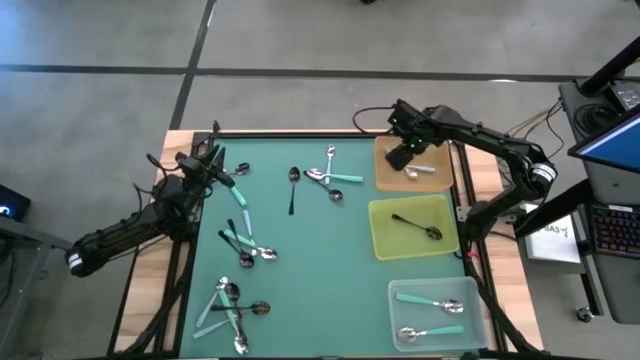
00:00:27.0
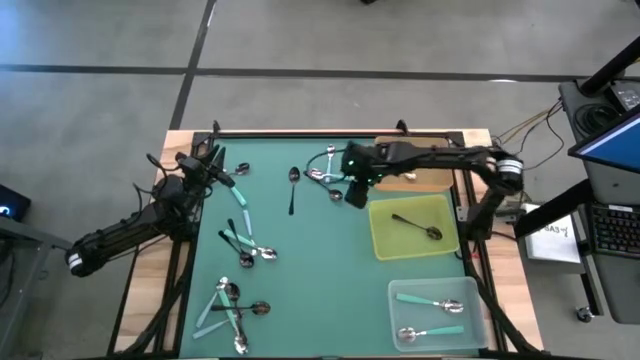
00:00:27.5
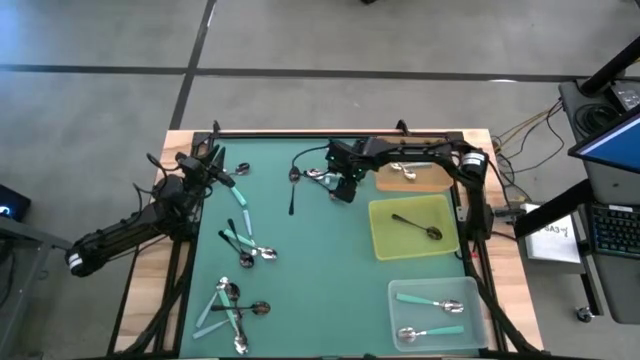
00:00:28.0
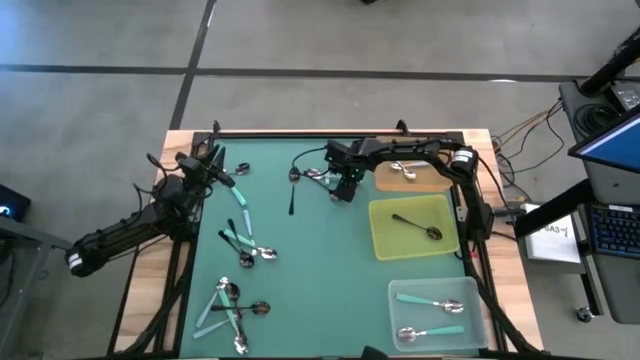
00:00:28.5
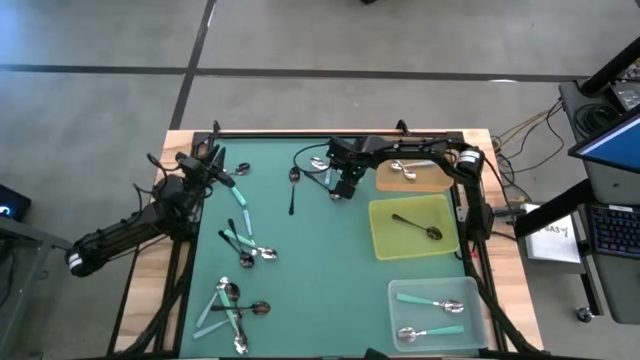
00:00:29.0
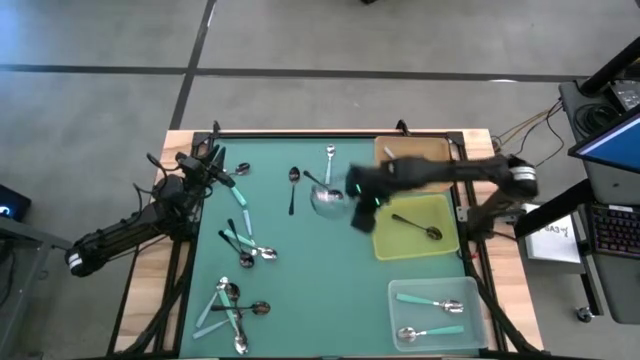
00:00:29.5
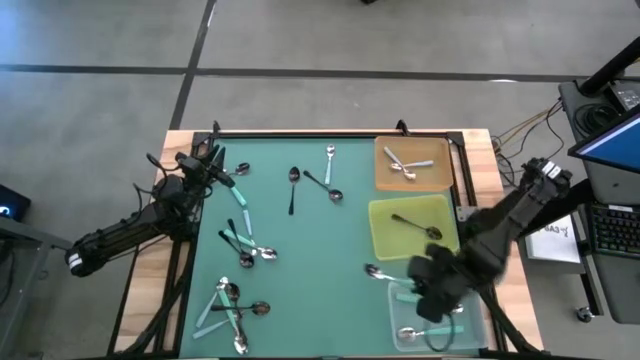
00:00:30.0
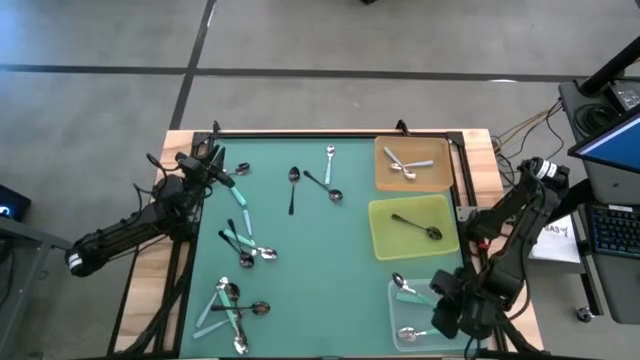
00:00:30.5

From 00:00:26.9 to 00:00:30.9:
Task: Sort silverware by color (type)
Put the green spoon into the transparent bin

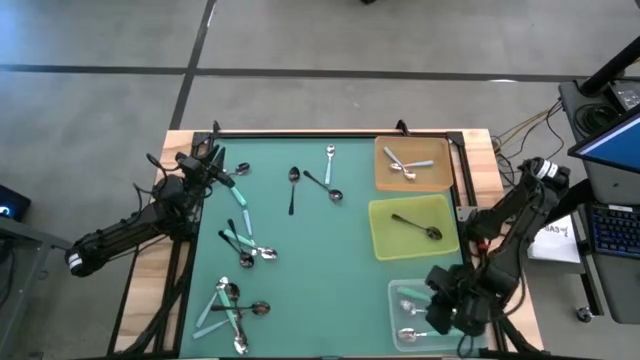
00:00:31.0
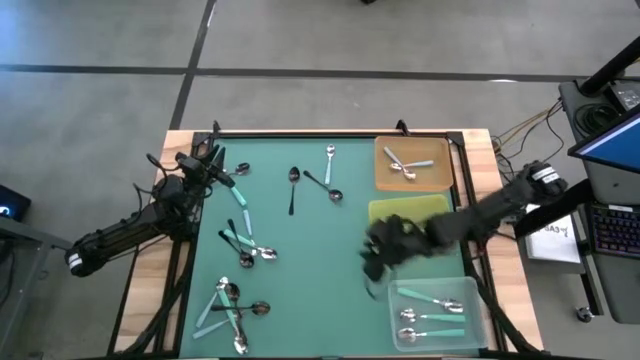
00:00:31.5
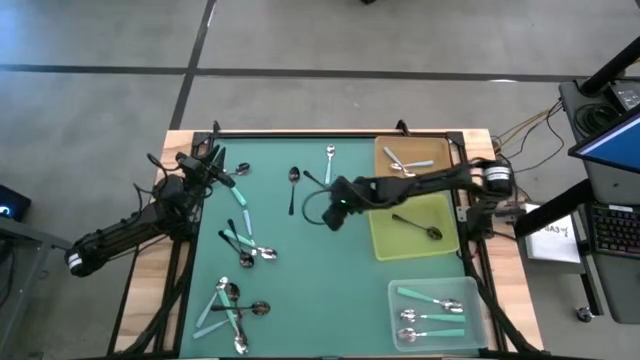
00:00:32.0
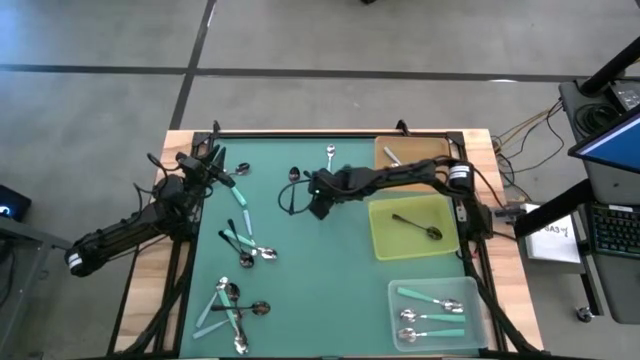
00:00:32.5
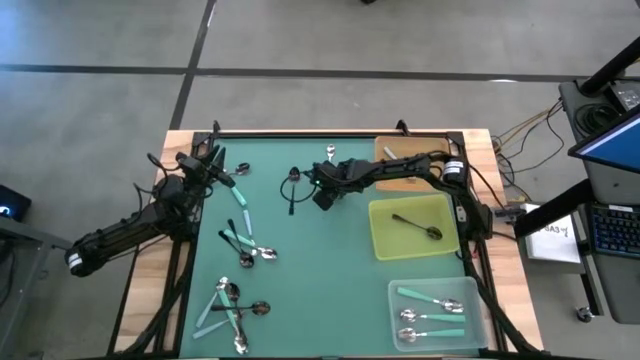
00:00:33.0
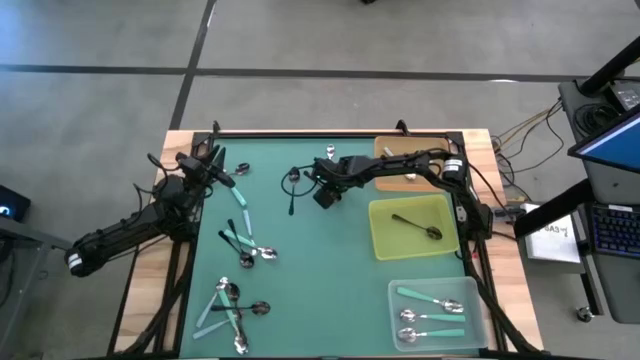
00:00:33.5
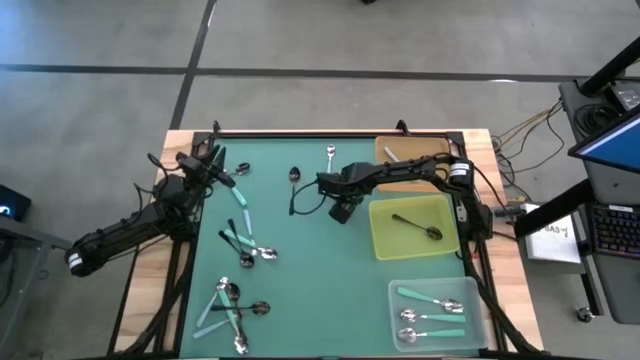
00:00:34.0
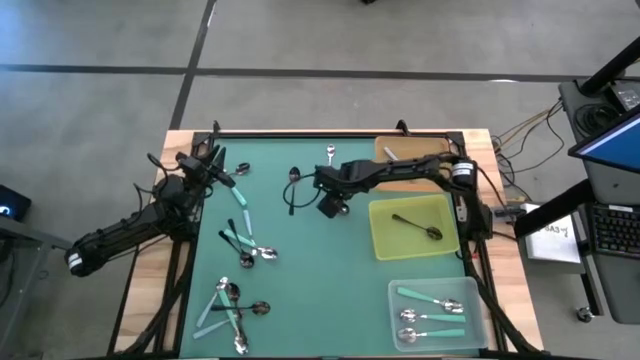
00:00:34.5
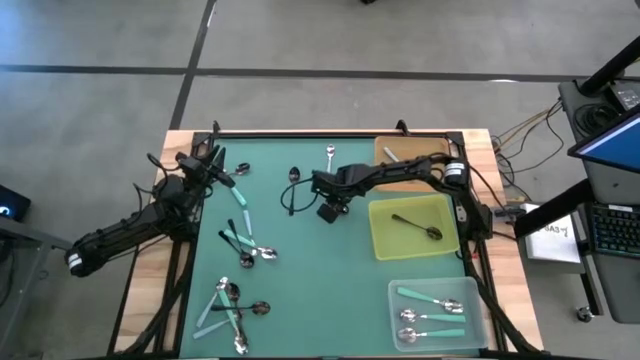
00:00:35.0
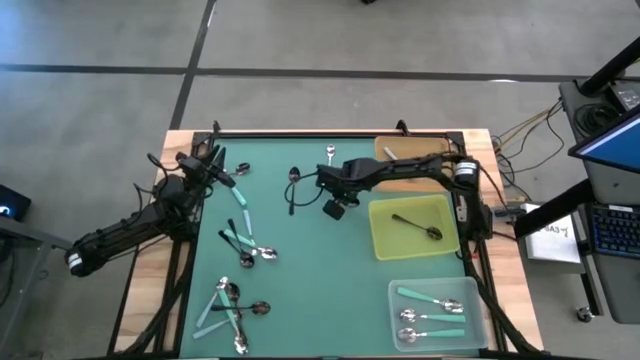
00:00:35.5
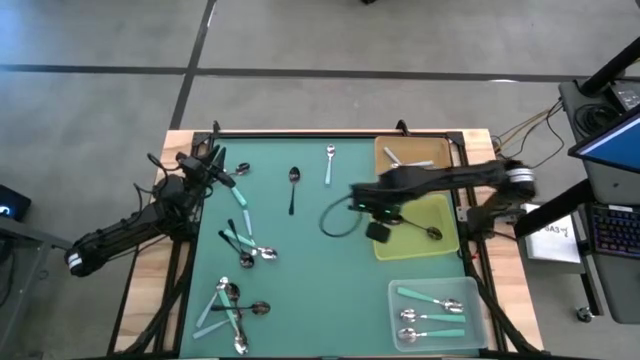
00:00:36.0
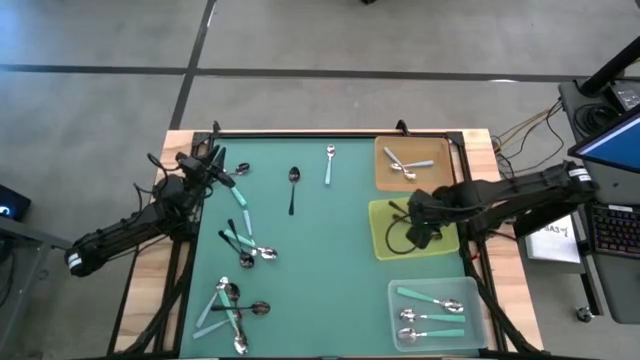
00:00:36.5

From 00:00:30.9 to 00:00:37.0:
Put the black spoon into the yellow bin

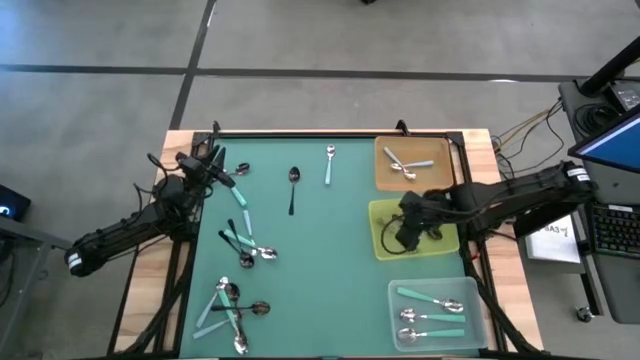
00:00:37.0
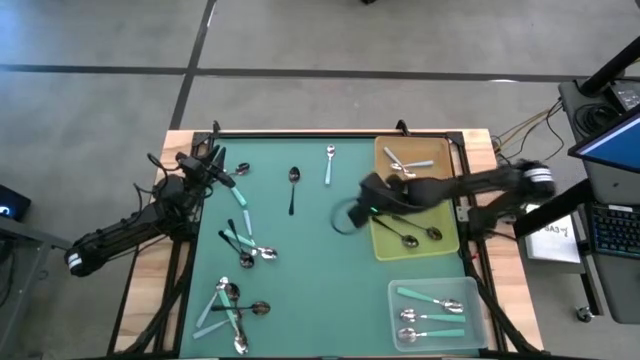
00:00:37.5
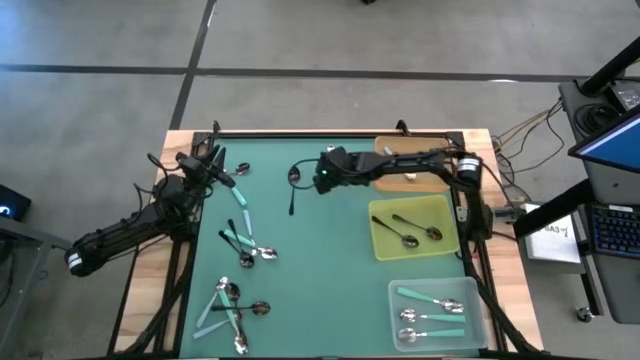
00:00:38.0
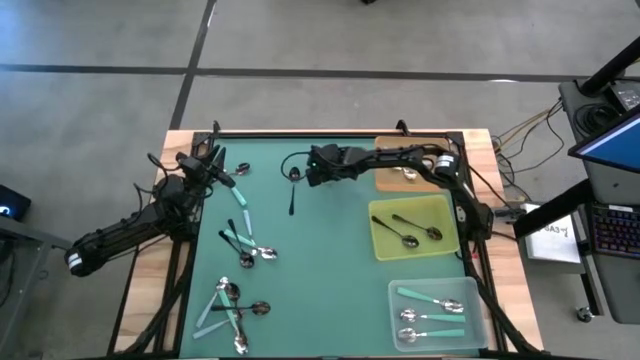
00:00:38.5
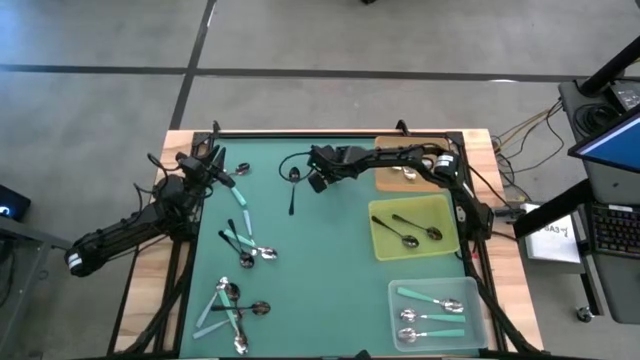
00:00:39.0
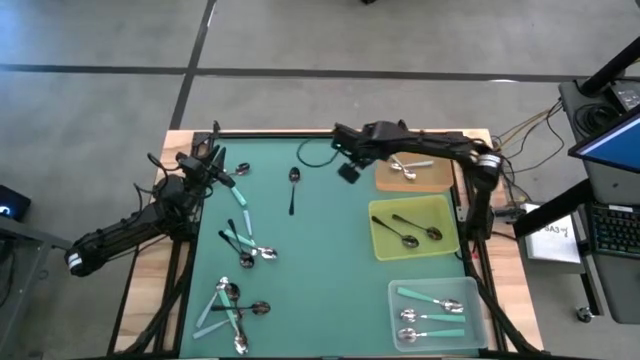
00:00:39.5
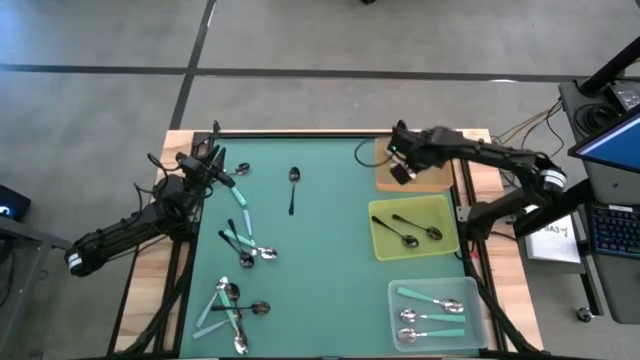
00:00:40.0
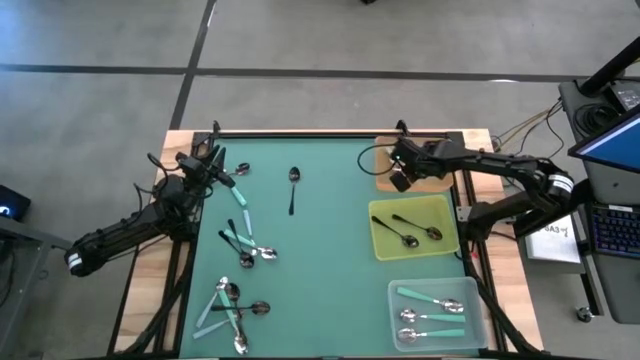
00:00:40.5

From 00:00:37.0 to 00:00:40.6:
Put the blue spoon into the orange bin

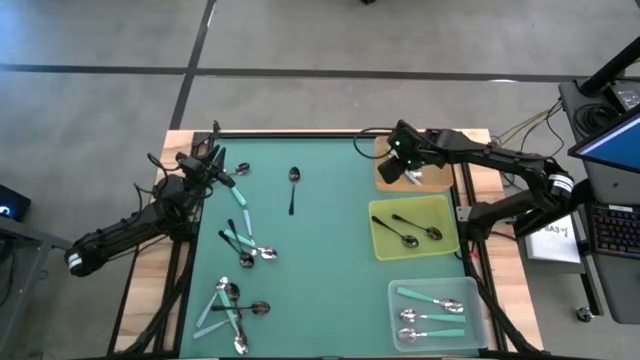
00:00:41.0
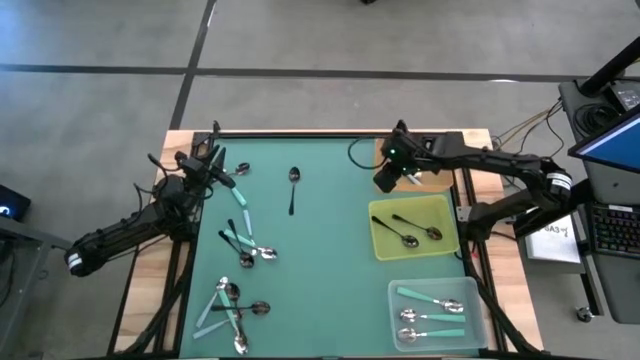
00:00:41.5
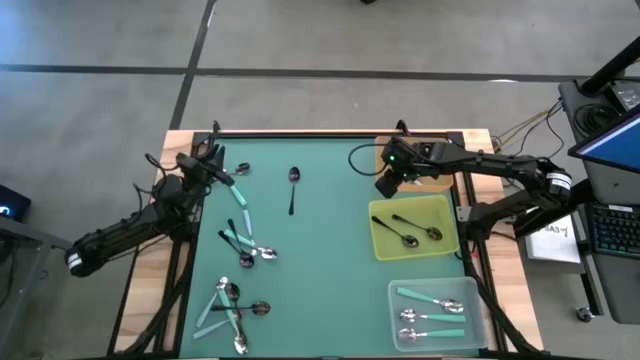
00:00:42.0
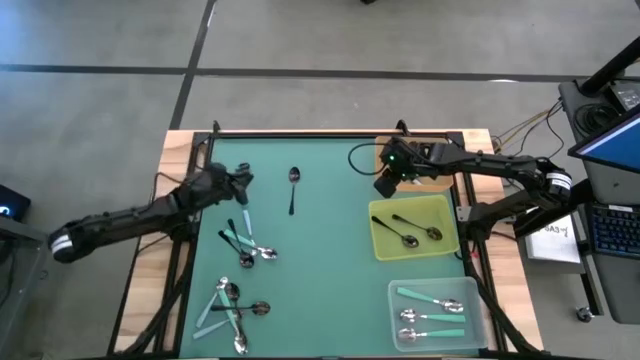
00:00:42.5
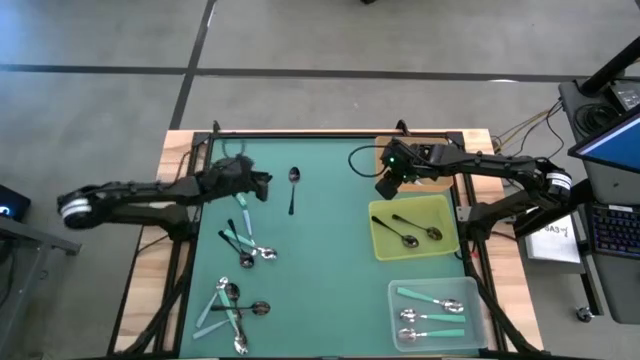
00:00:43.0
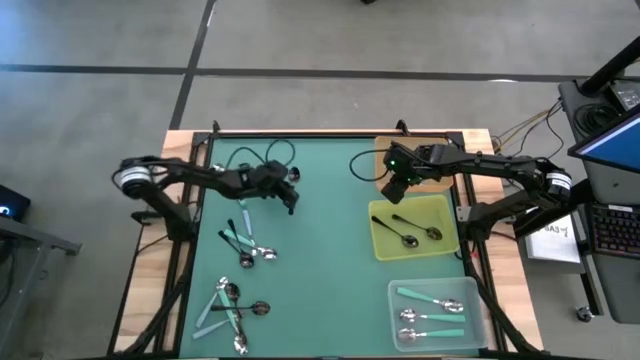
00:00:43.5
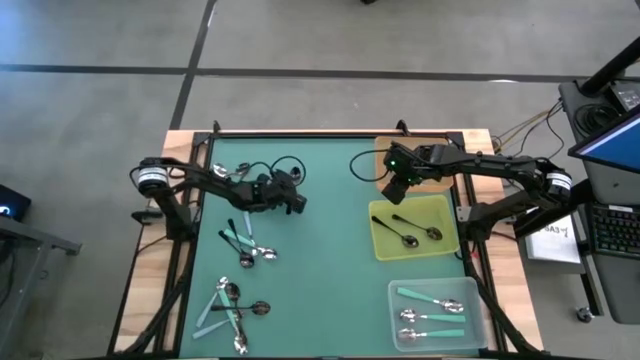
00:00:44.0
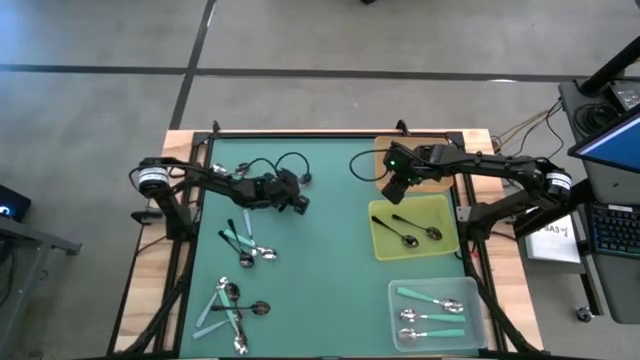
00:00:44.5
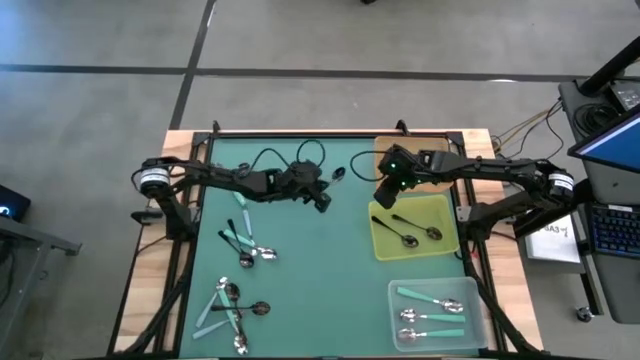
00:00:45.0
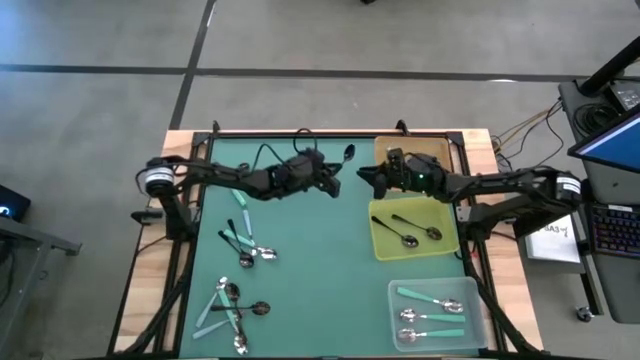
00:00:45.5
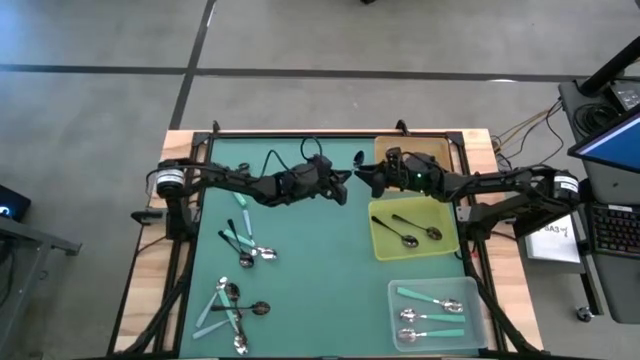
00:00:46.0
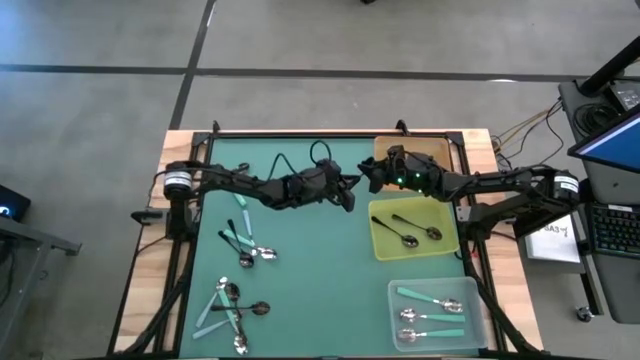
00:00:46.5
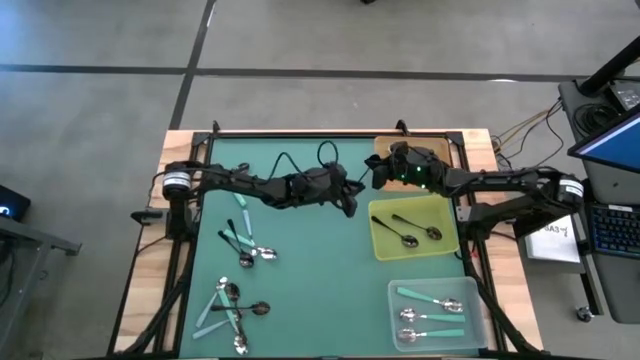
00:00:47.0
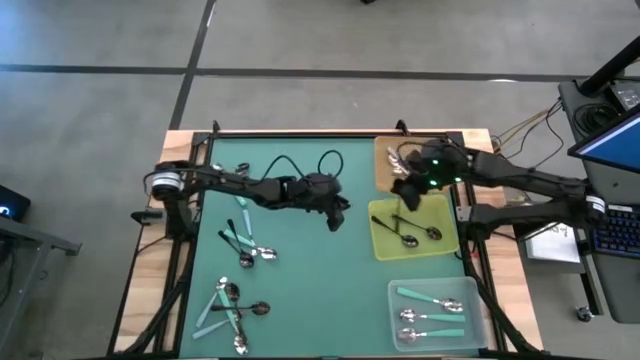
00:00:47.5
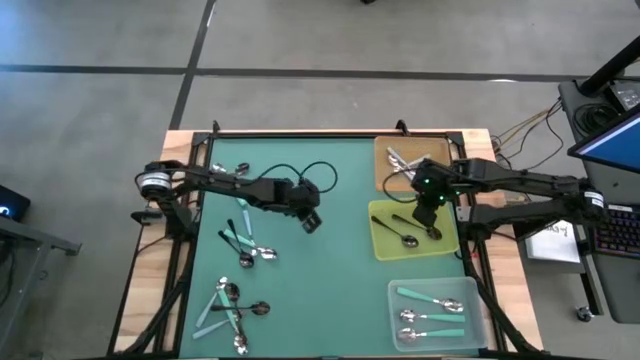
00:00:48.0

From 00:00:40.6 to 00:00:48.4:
Put the black spoon into the yellow bin

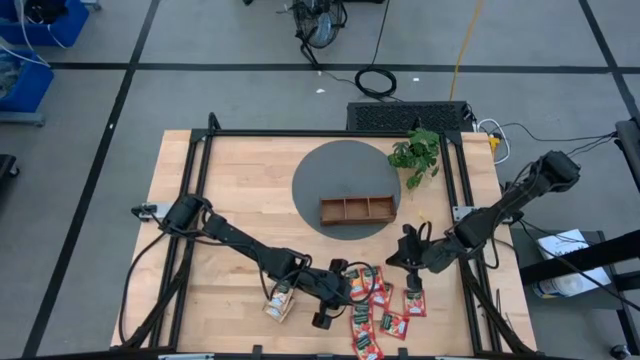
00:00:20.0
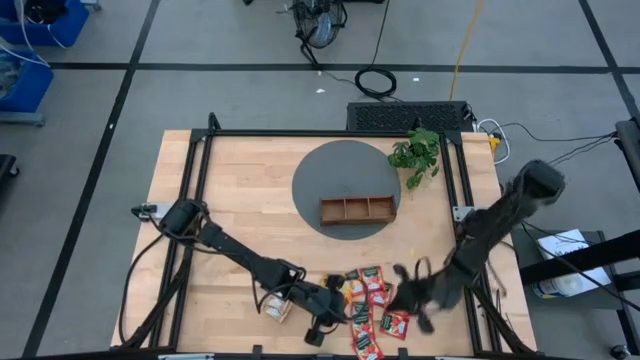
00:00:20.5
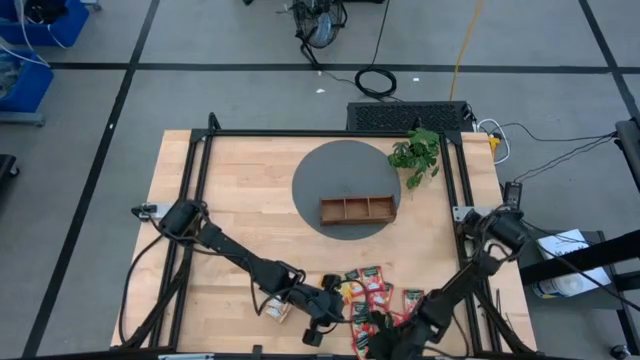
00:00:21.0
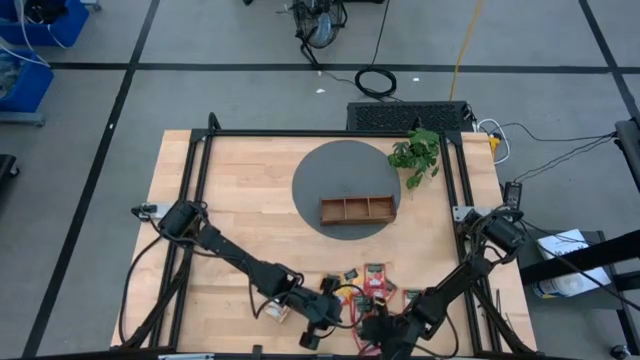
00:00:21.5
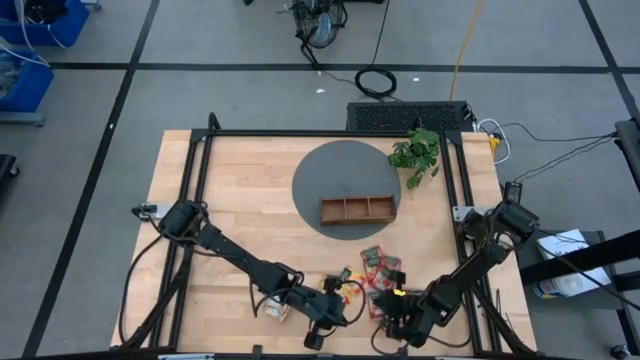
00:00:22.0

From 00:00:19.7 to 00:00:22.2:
Task: Pick & Place Tea
Adjust the red tea bags on the table
